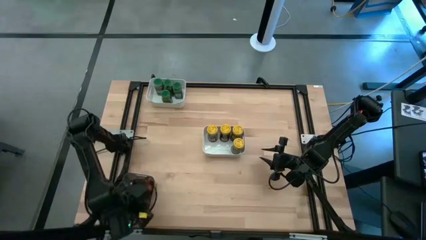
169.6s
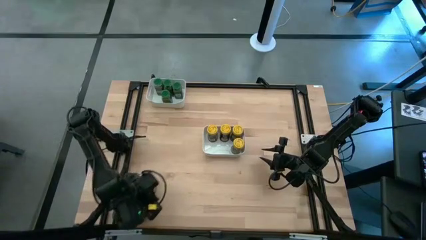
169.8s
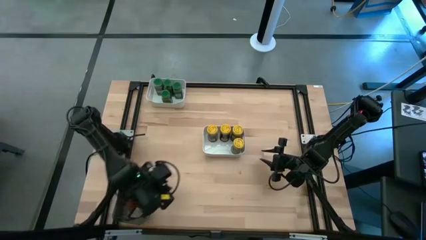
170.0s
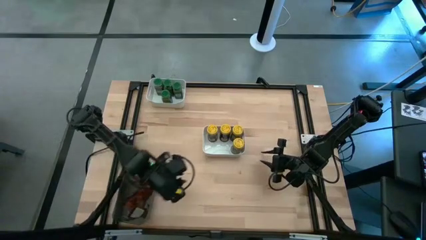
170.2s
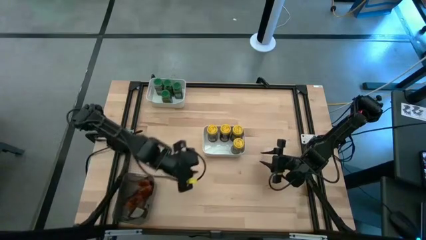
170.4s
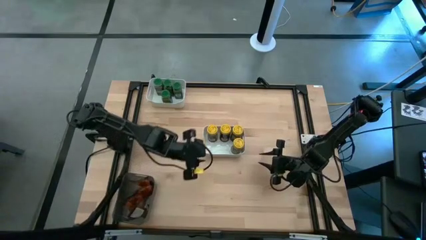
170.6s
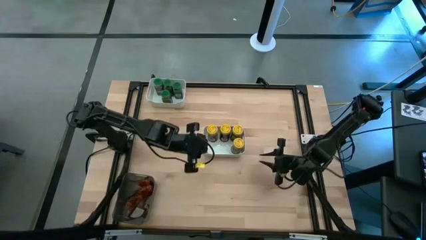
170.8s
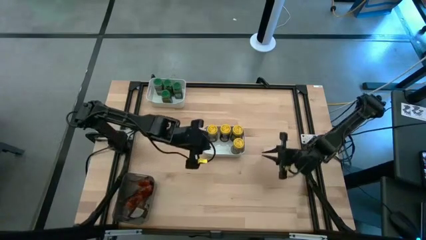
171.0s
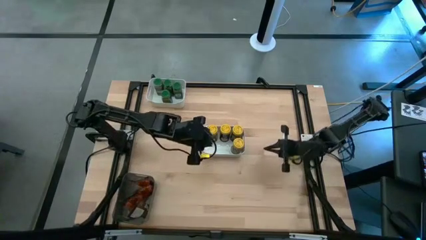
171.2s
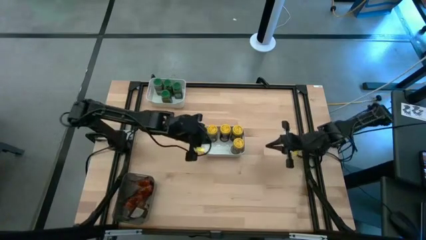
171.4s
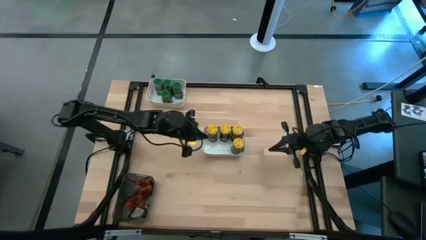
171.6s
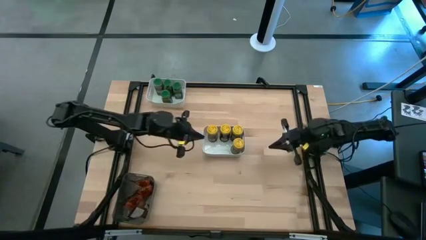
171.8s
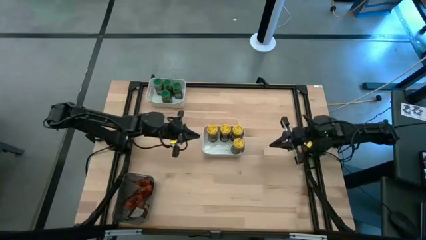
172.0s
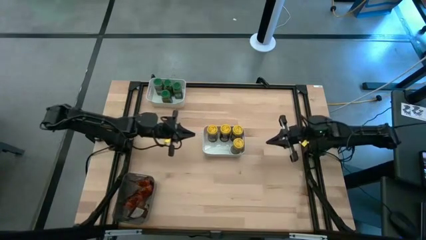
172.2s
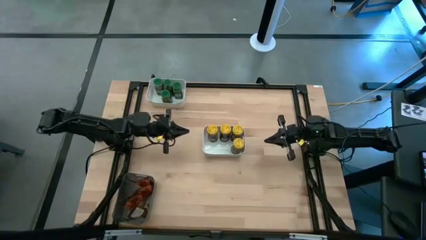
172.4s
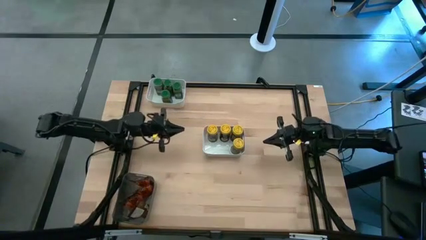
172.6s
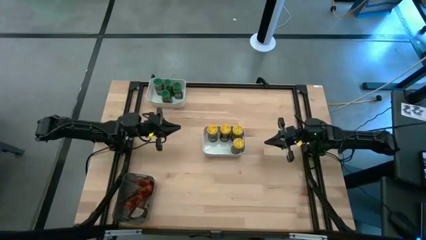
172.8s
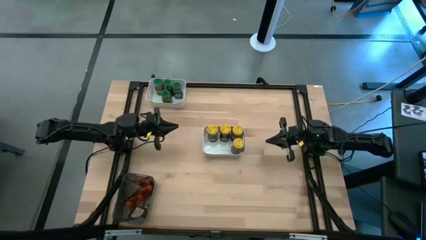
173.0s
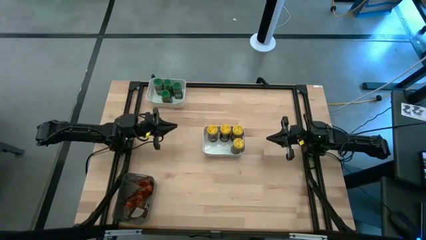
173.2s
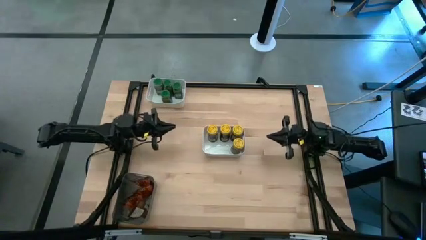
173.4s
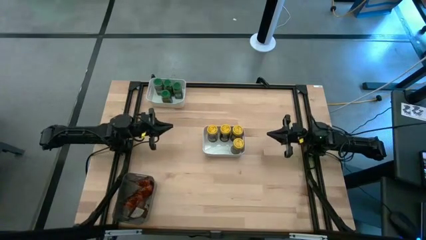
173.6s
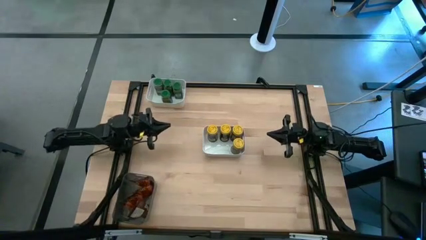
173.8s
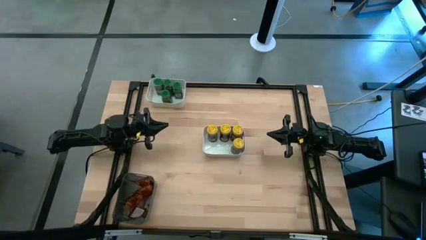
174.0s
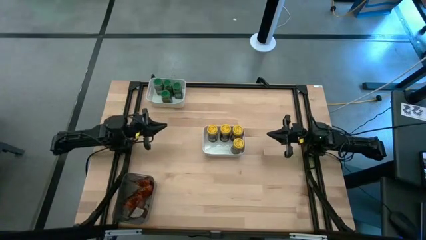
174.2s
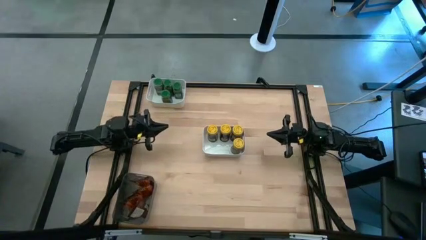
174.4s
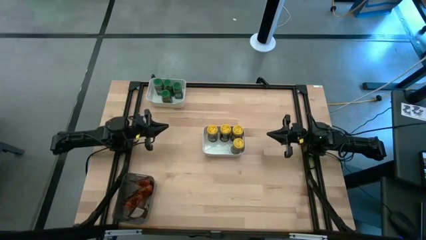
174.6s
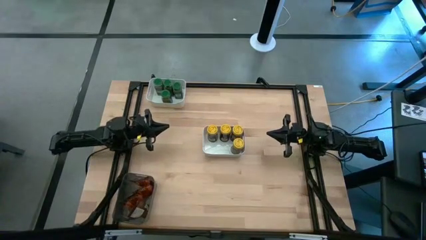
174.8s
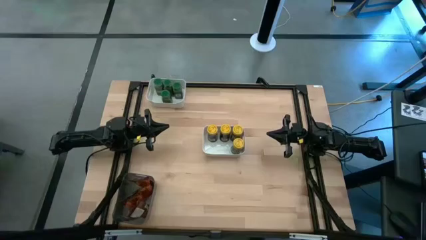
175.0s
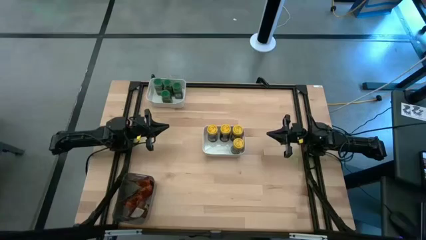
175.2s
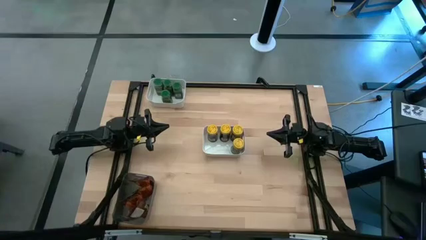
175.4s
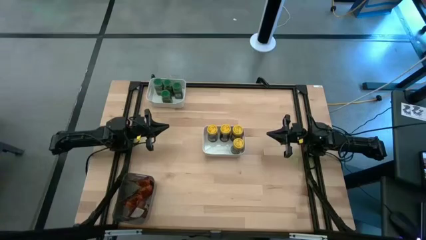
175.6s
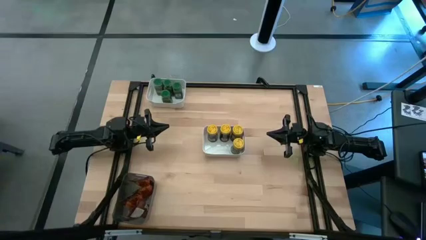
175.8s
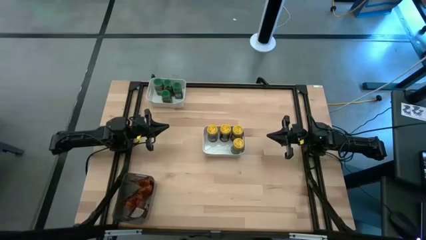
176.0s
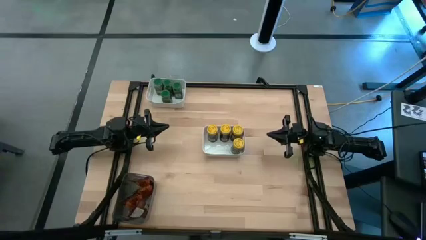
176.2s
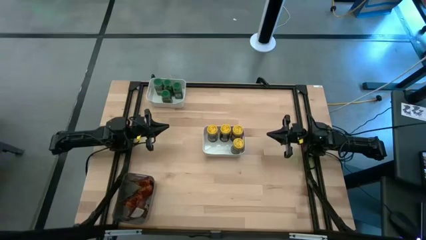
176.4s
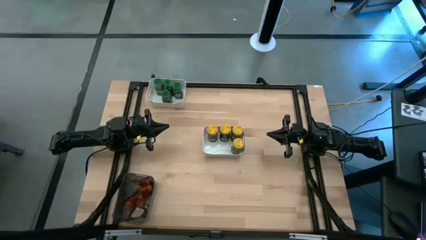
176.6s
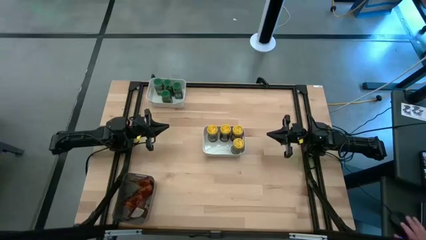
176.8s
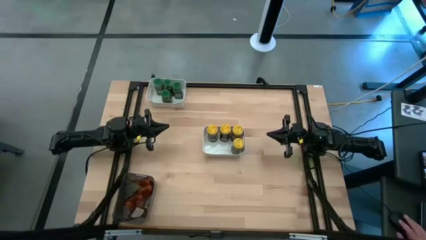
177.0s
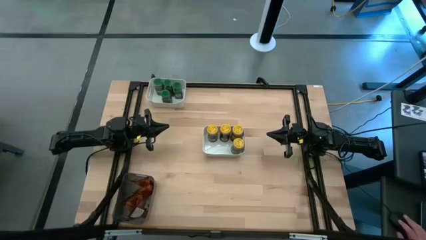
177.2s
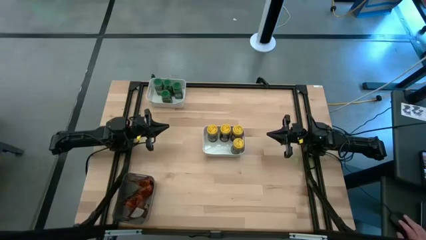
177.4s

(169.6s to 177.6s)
Task: Sort spices by type
Return to Home Position

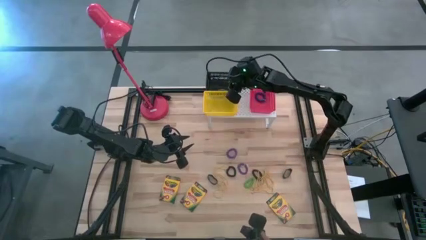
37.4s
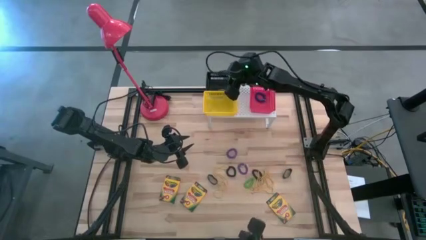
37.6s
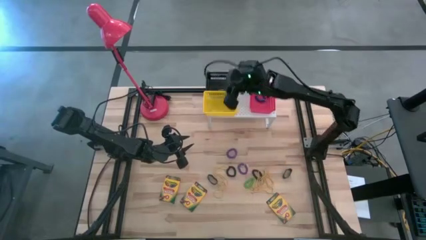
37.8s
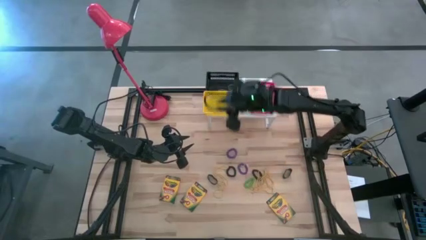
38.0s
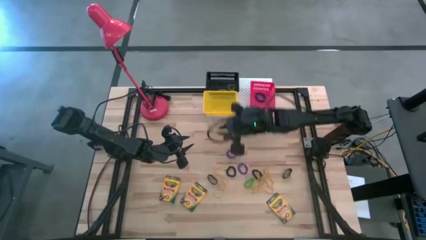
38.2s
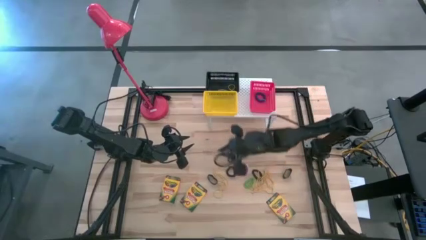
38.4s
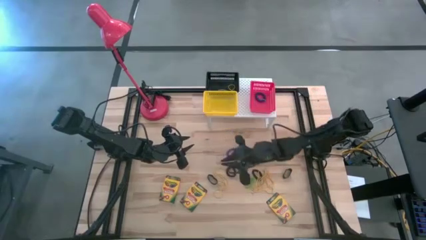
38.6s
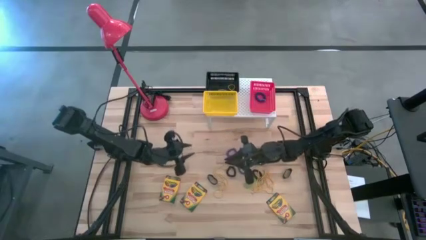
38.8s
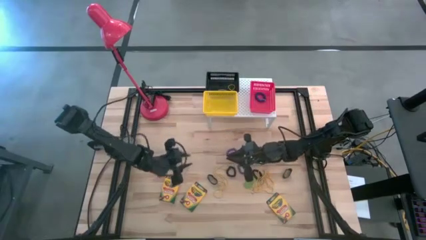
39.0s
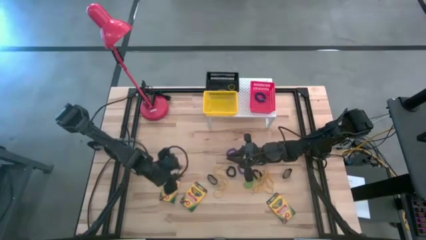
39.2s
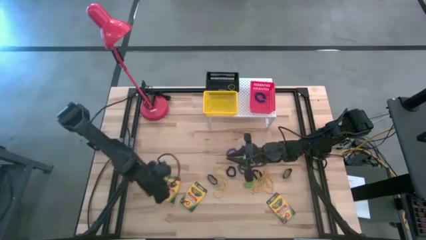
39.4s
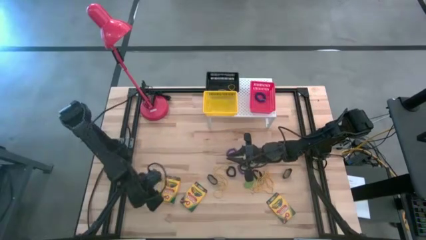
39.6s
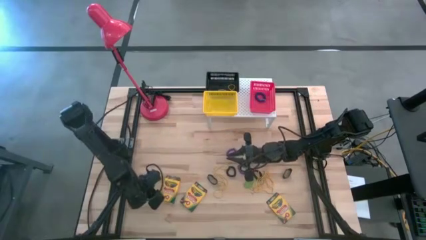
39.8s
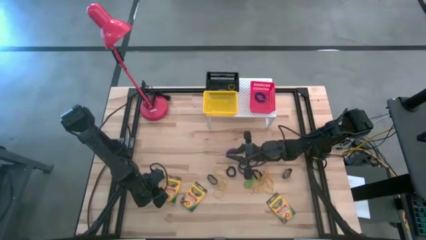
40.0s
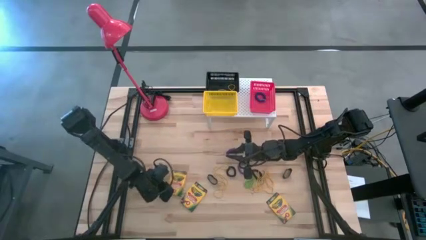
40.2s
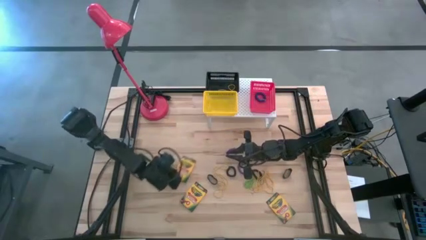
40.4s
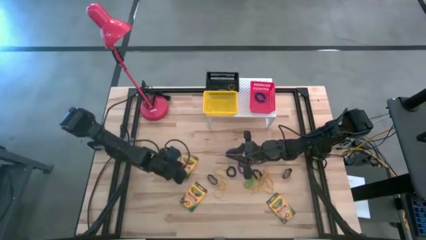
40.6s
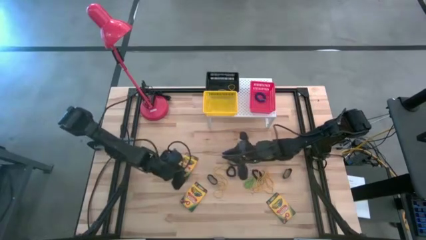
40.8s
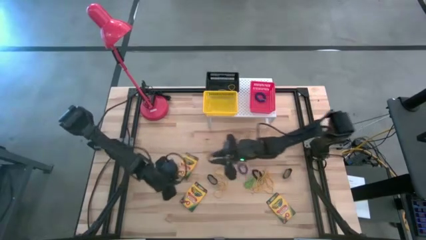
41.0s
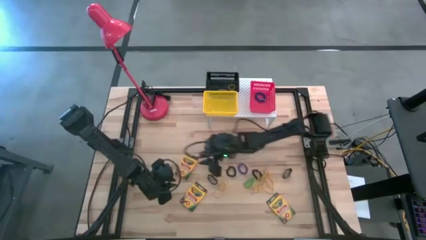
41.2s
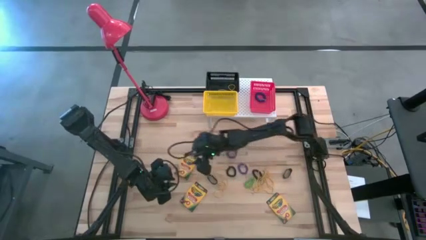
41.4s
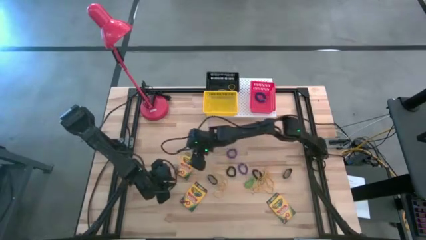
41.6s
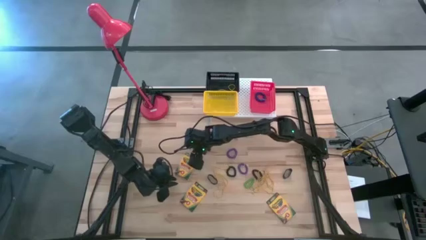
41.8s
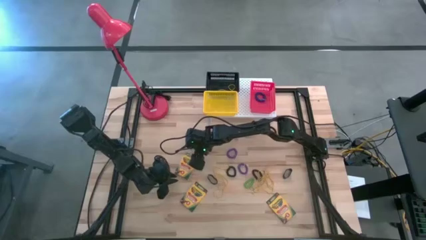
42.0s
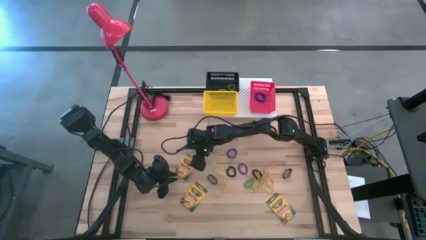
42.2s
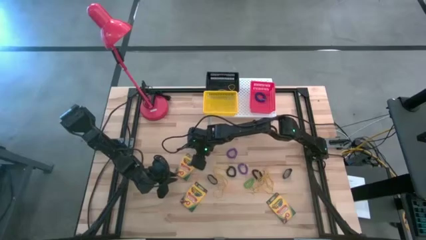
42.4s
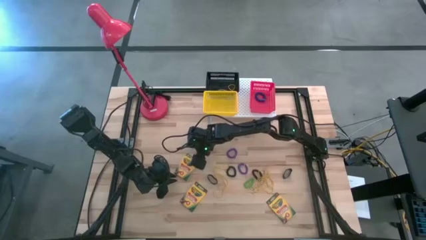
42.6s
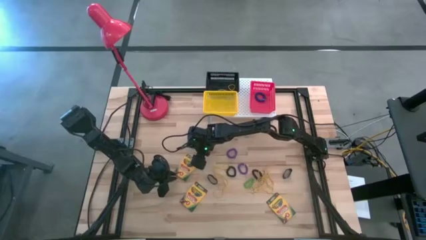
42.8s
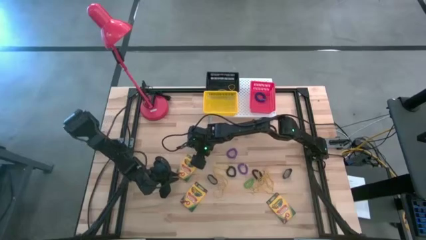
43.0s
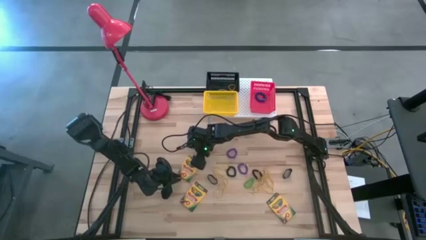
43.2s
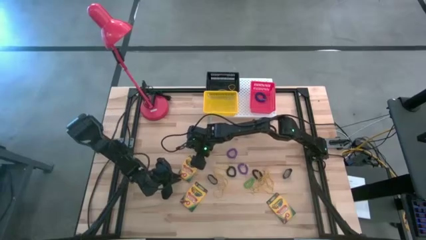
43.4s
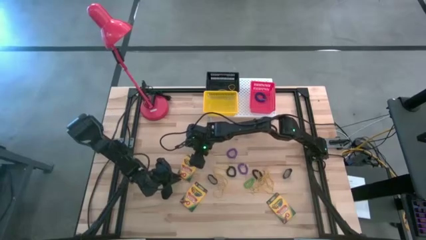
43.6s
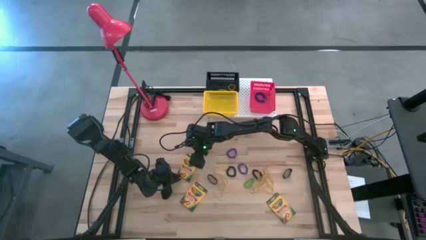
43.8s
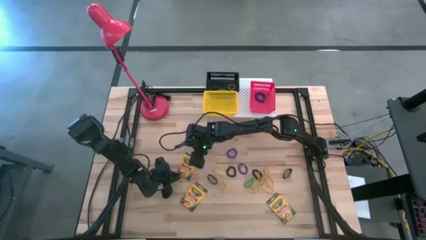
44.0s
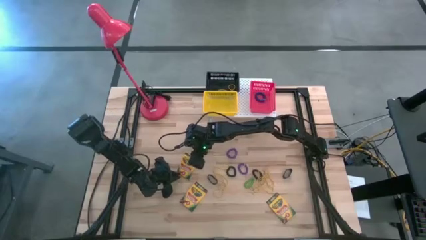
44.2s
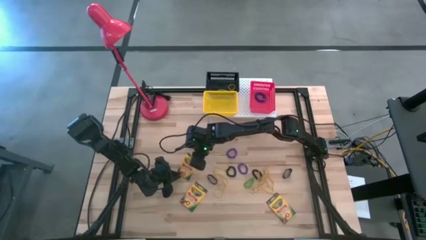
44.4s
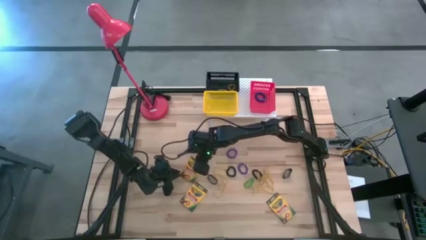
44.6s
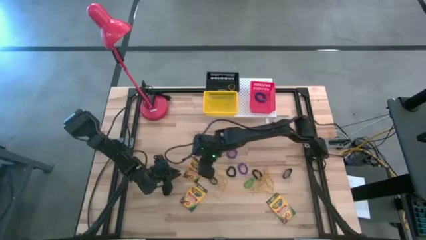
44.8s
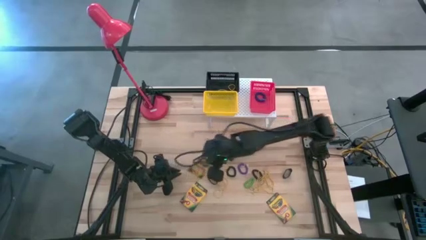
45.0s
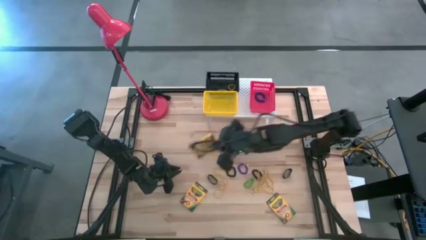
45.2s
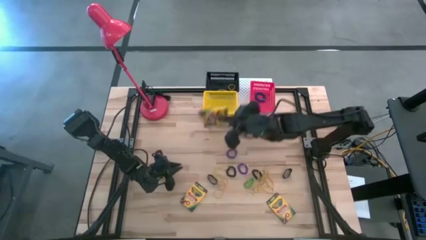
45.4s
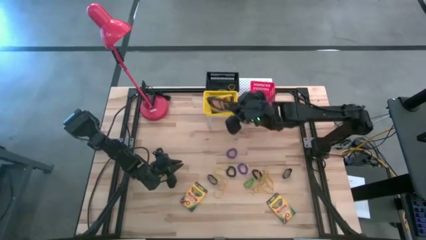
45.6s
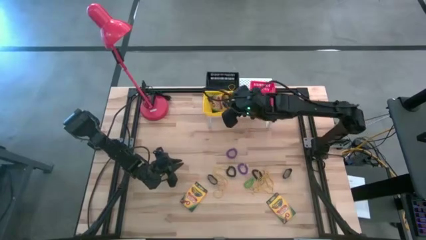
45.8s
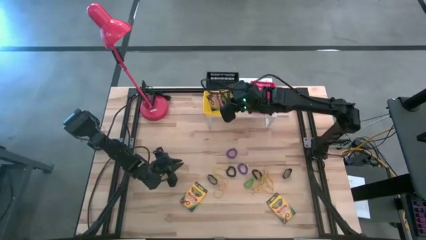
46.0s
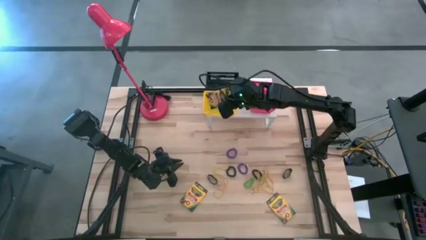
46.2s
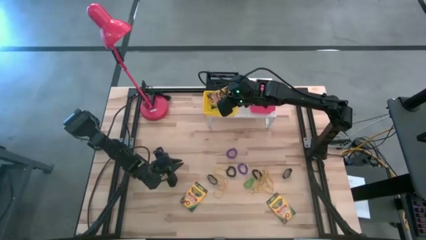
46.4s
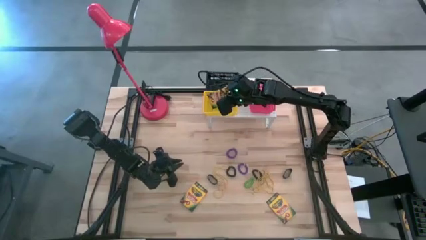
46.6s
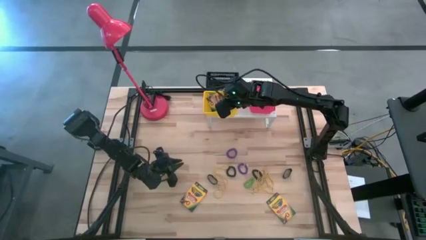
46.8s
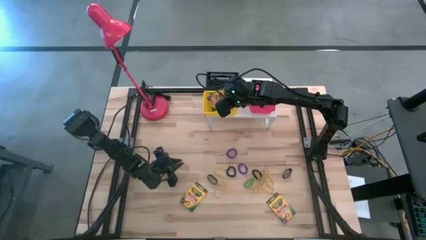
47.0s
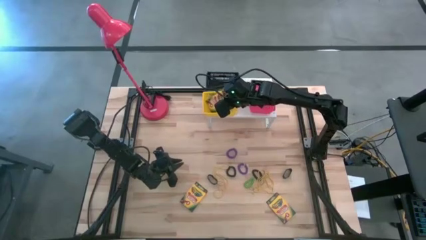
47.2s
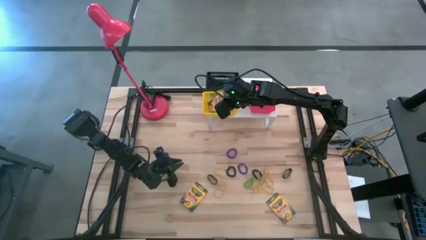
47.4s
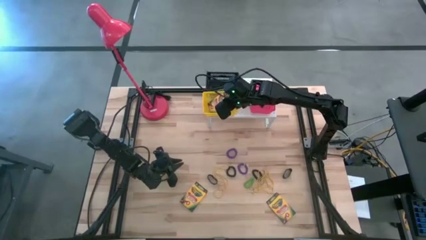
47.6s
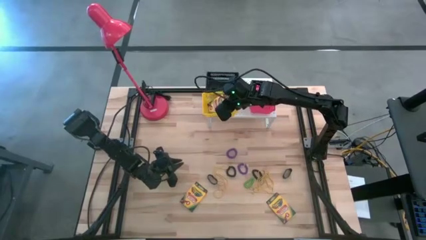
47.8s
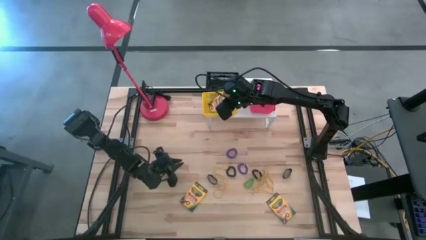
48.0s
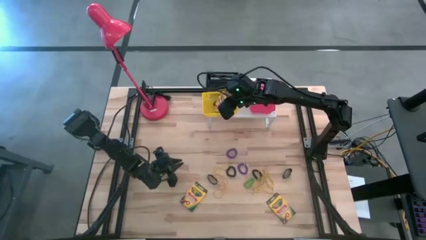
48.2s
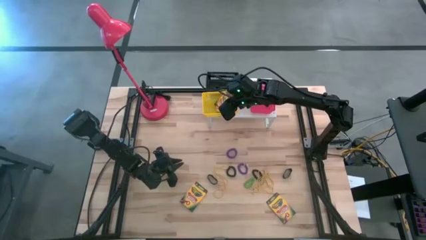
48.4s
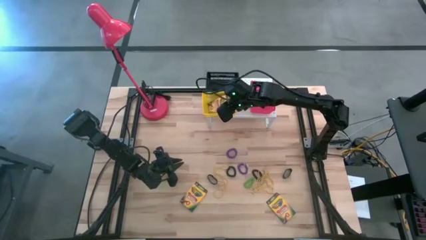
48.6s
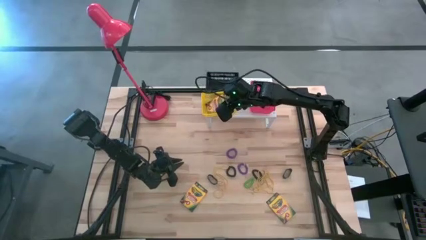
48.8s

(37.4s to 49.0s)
Task: Pick & Place Office Desk Supplies
Put the yellow crayon box into the yellow bin on the shelf
